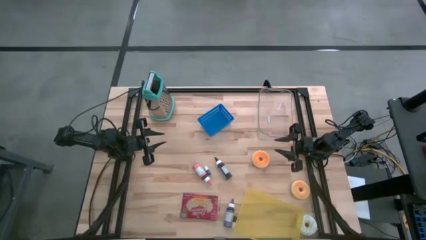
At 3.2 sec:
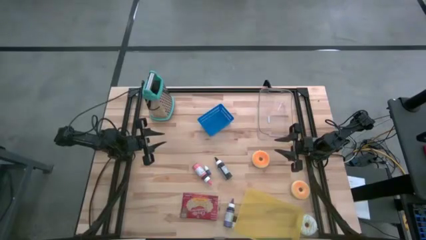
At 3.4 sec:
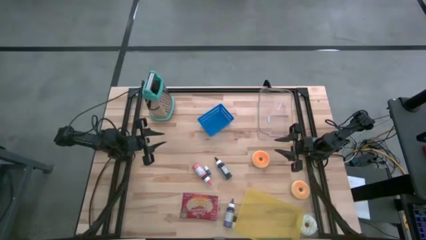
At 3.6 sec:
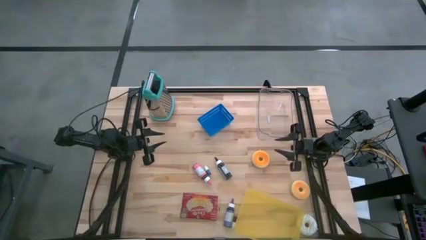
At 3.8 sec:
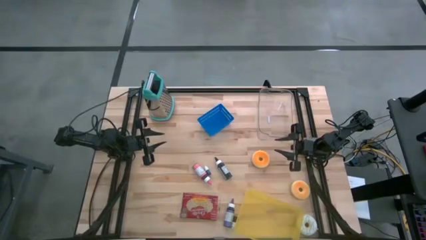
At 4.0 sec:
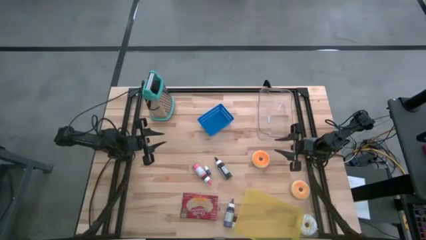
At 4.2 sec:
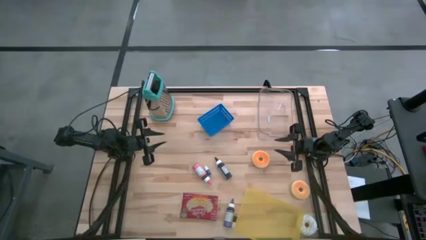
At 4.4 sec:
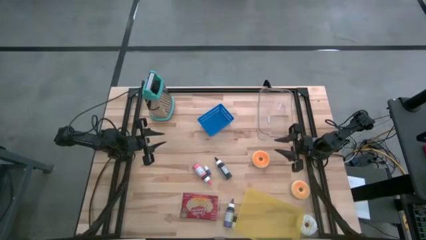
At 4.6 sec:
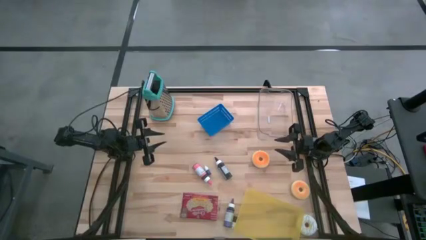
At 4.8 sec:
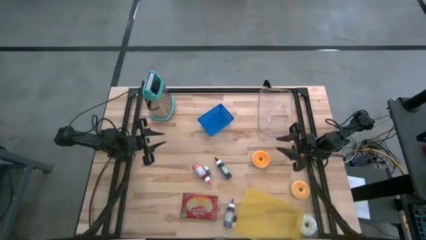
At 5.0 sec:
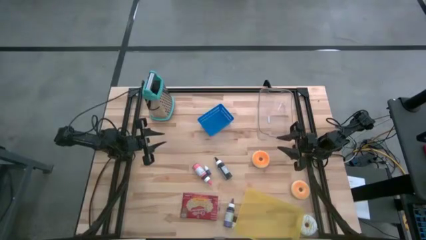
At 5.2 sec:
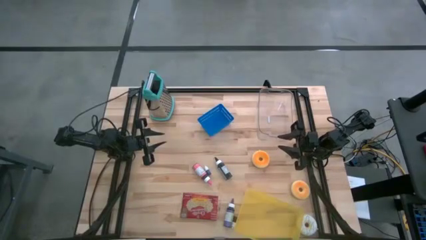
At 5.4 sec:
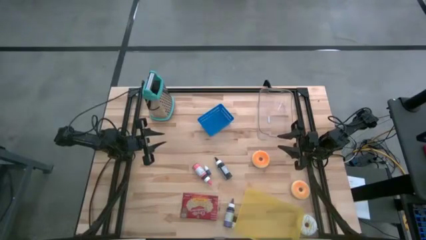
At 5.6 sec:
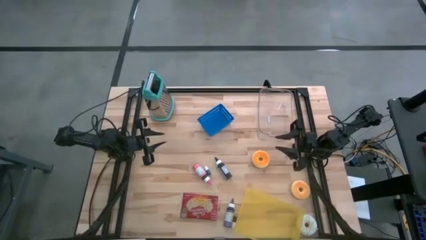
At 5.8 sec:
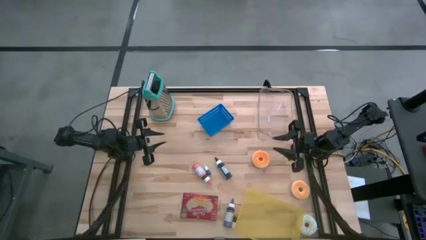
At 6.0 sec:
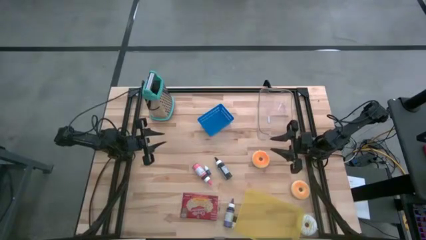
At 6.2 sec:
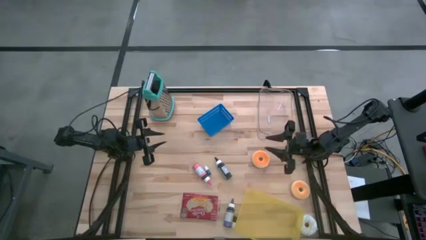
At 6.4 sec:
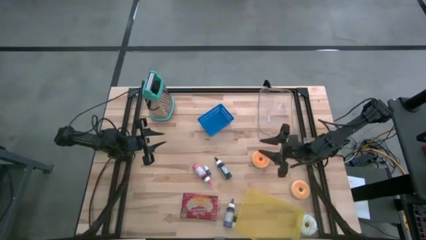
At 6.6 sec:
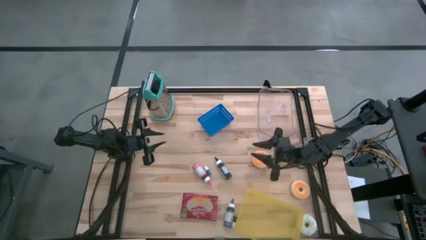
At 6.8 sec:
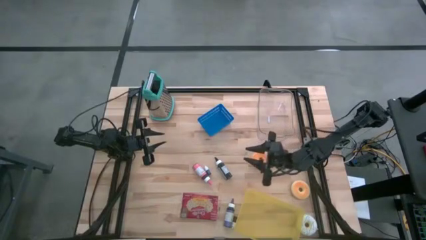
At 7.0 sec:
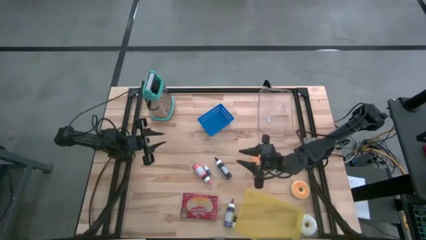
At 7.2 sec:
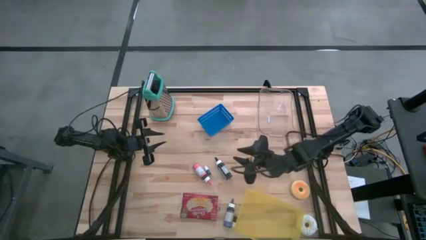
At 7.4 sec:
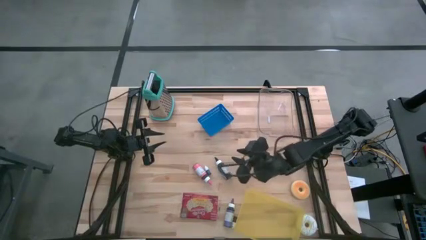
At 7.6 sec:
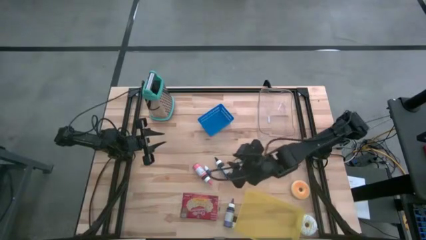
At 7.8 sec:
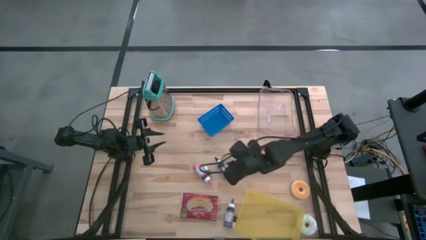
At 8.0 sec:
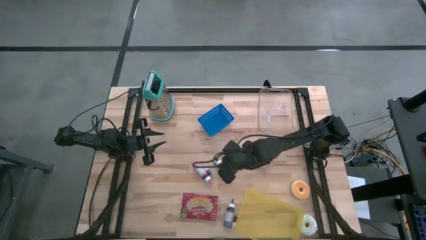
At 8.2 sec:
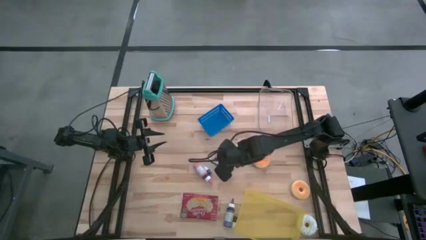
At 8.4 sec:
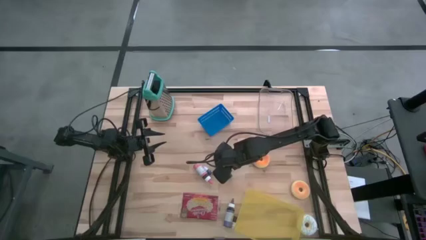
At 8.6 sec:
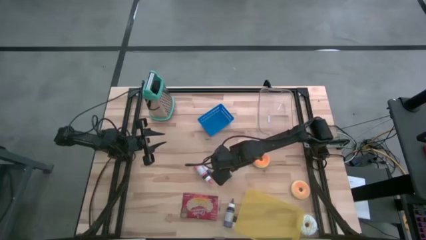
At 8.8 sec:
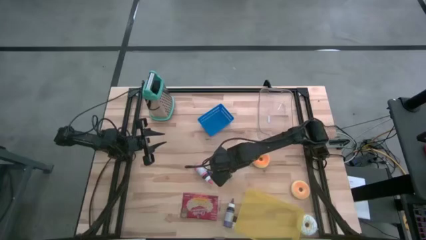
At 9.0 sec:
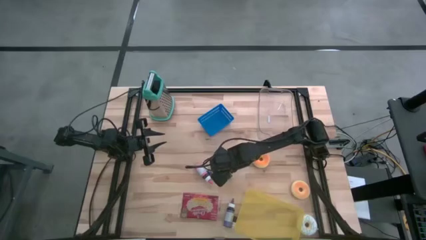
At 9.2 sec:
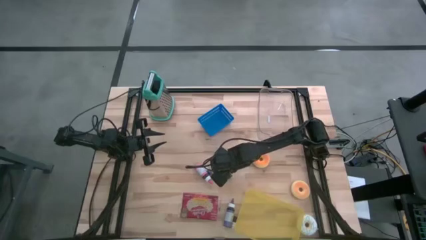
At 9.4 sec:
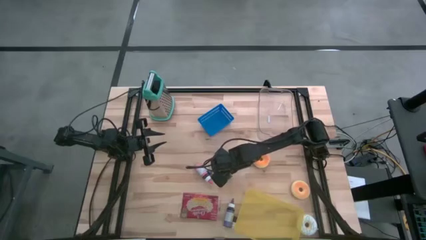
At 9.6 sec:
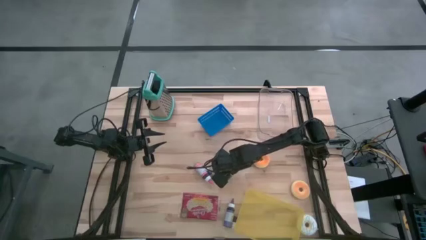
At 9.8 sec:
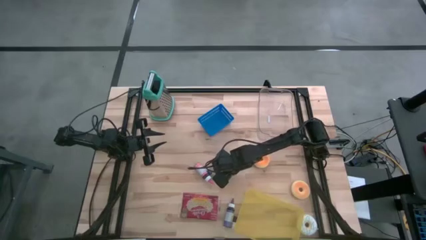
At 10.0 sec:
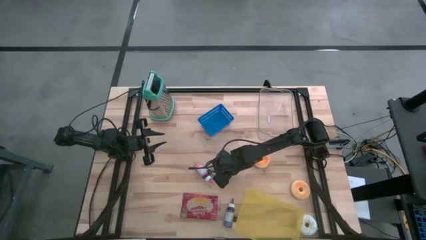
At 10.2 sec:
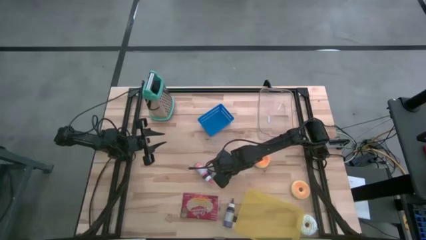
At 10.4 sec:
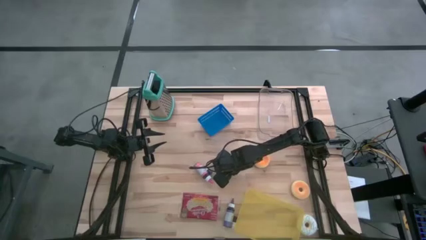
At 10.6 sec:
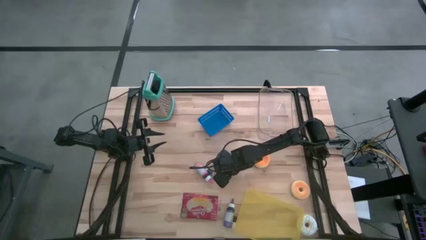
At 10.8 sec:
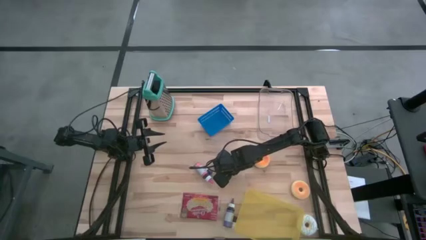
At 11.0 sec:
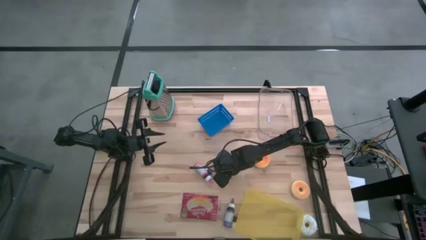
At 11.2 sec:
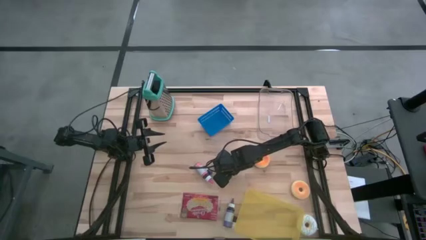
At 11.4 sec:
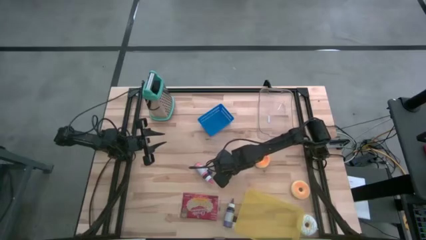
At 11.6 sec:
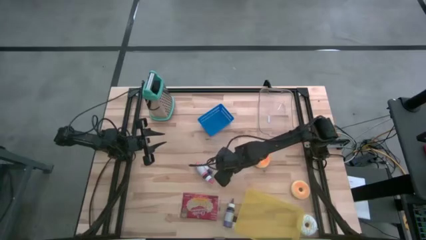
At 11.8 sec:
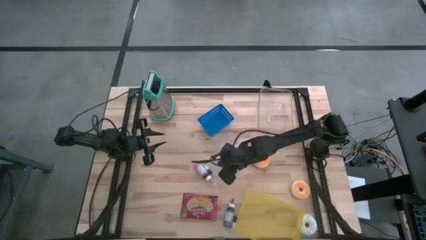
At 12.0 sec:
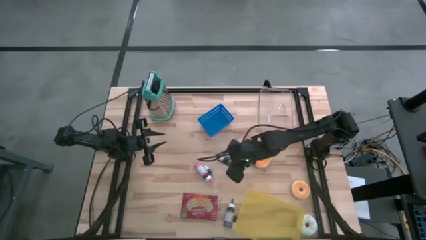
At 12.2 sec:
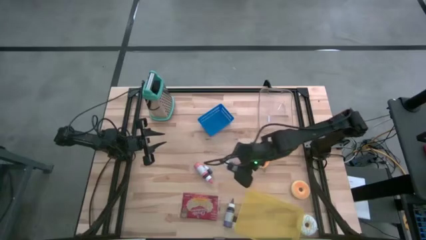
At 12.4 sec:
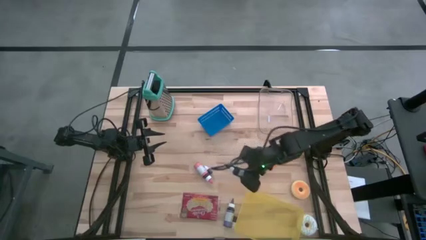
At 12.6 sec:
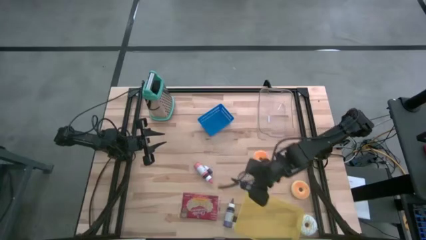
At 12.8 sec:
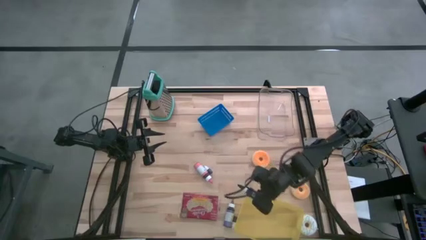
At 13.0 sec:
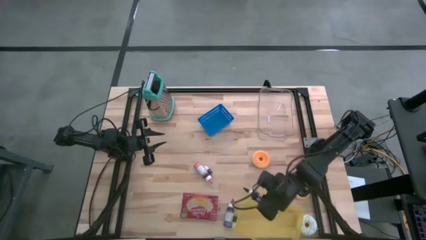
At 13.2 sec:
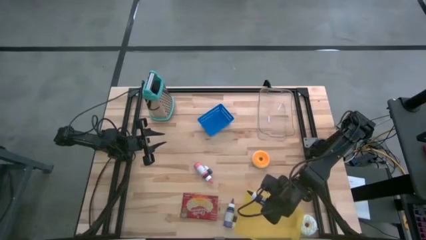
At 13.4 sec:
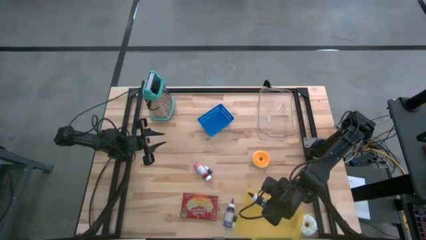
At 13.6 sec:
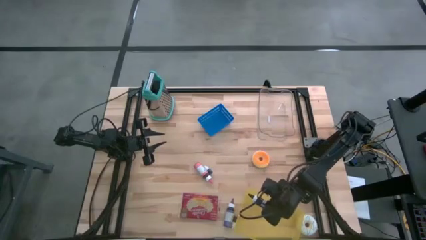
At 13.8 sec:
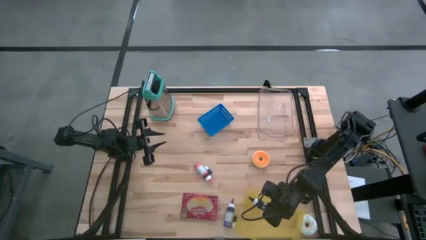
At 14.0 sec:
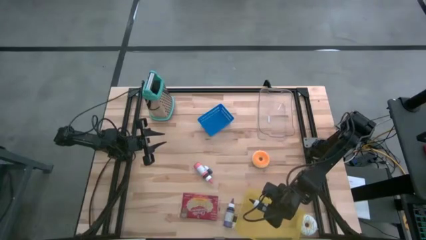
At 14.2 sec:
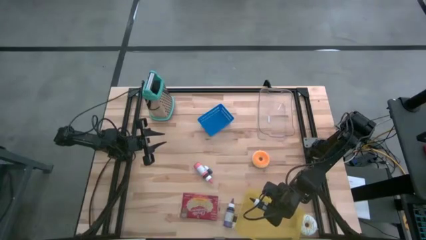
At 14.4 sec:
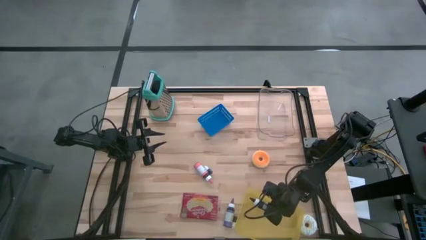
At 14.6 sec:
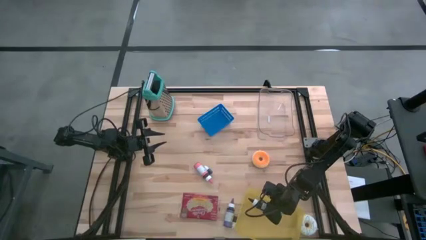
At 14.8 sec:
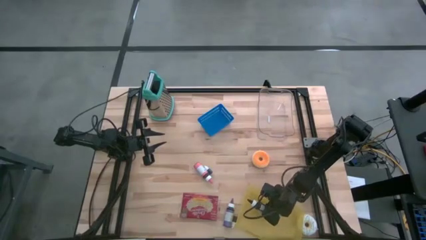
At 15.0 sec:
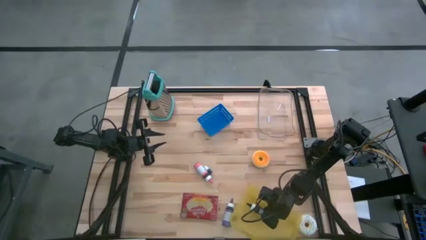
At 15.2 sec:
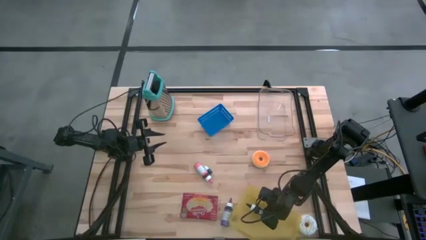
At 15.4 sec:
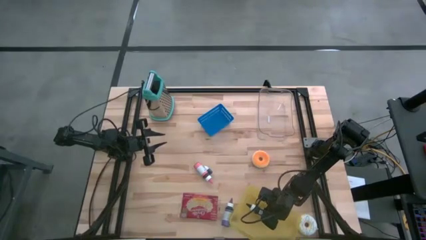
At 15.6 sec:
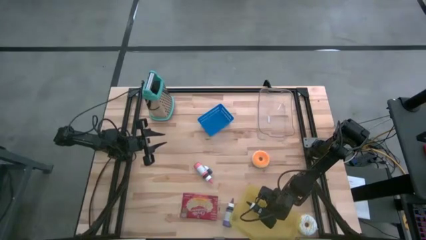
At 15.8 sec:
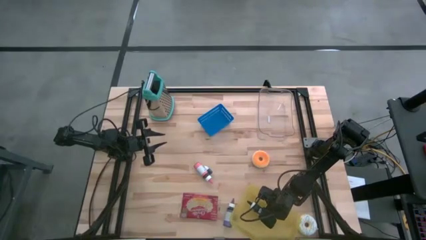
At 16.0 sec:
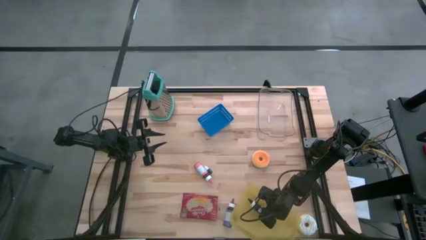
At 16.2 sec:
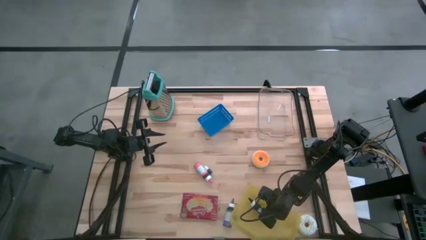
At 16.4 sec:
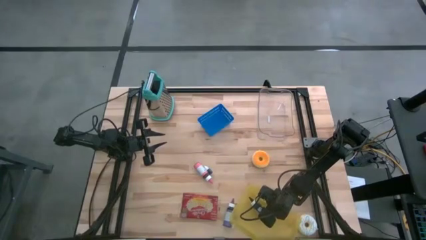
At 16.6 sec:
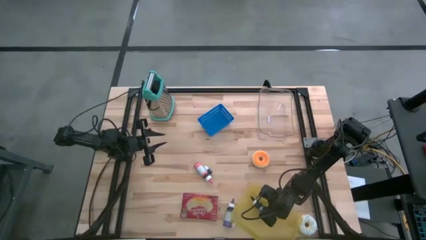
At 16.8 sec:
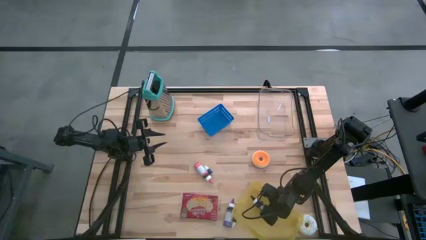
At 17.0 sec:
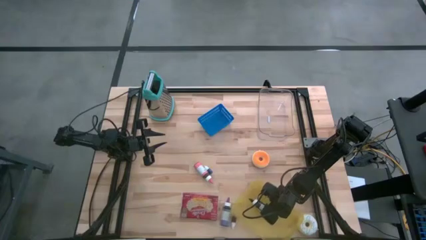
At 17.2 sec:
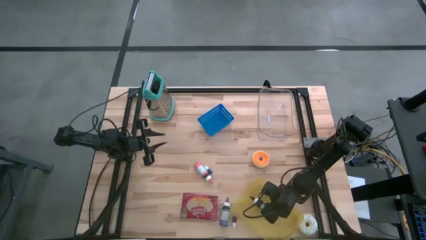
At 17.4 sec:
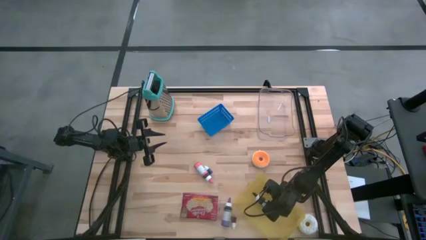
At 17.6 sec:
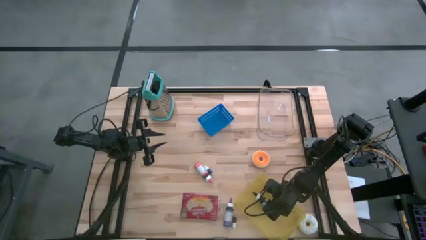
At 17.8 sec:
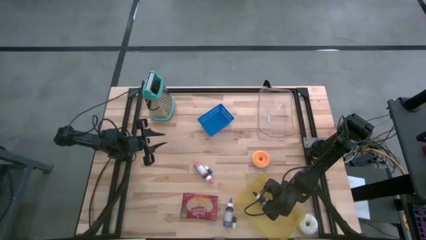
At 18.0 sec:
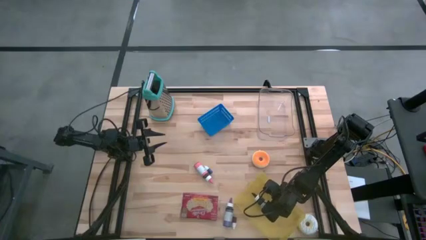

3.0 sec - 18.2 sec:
Task: Pick & Place Food Item
Put the big black food coloring into the yellow bin
